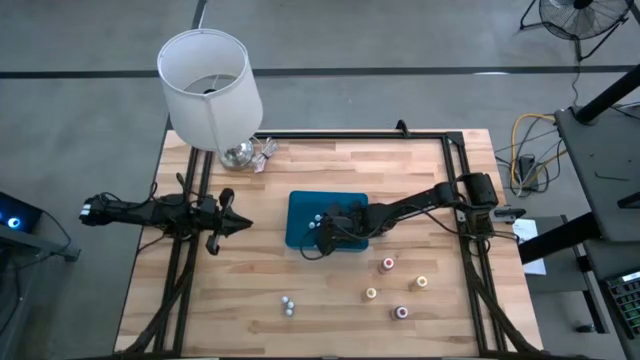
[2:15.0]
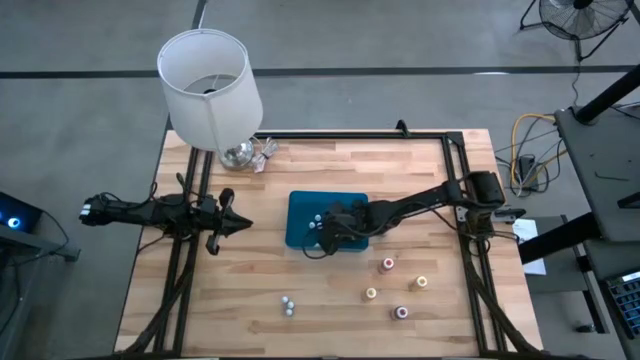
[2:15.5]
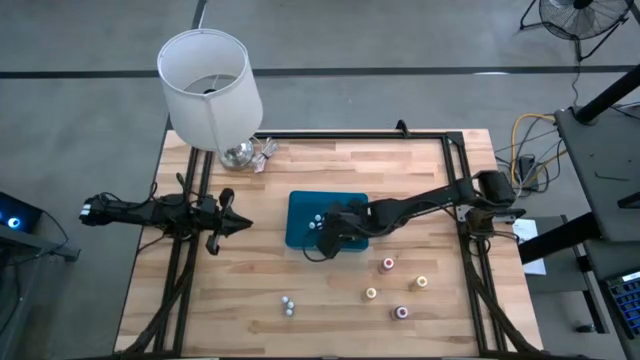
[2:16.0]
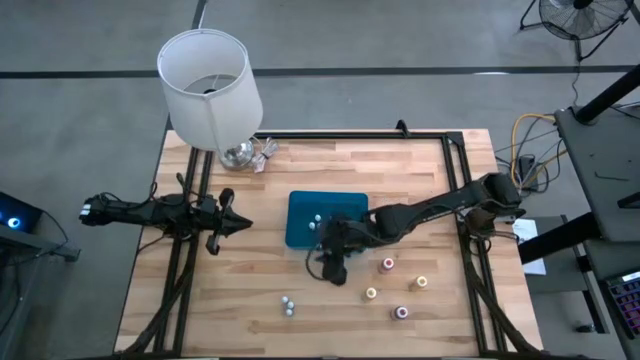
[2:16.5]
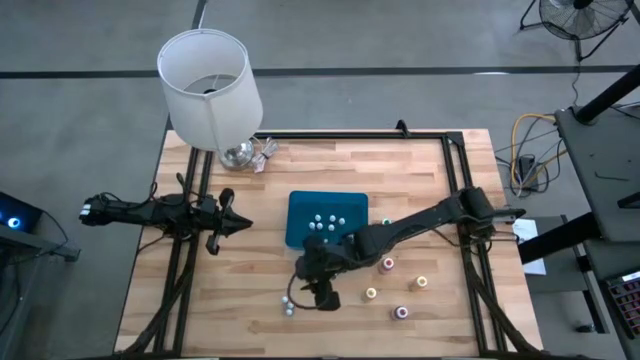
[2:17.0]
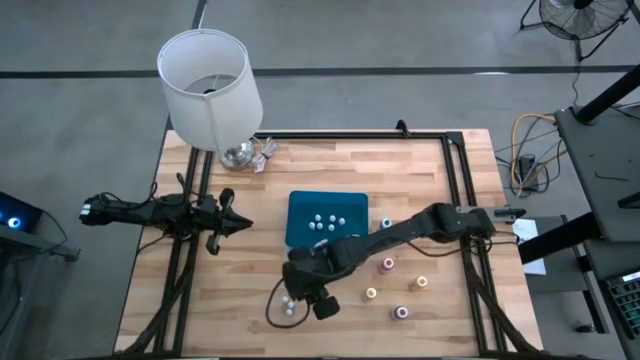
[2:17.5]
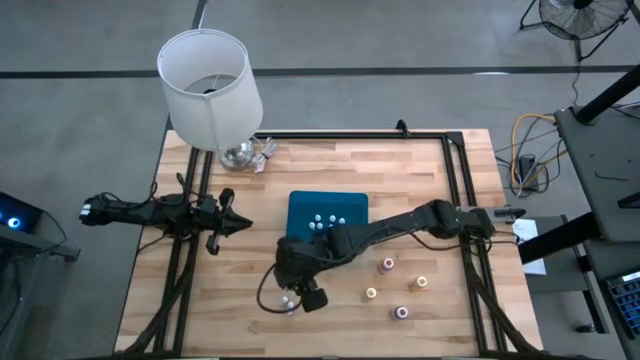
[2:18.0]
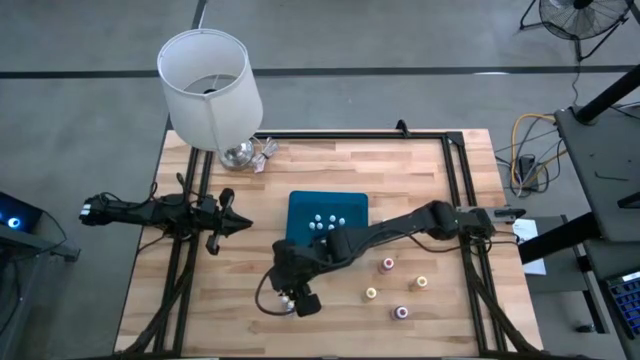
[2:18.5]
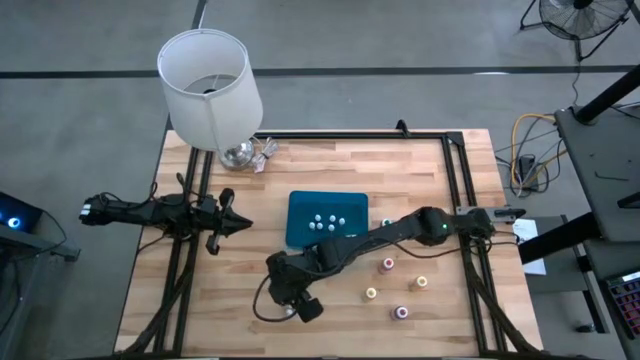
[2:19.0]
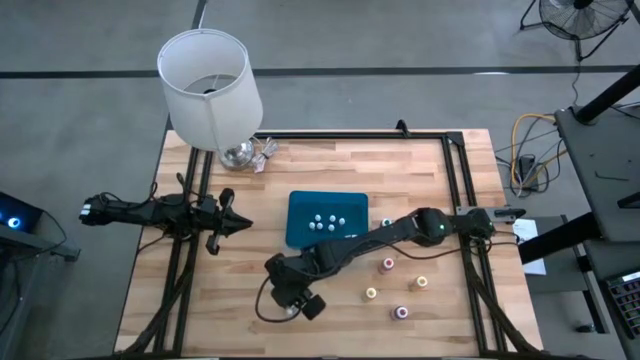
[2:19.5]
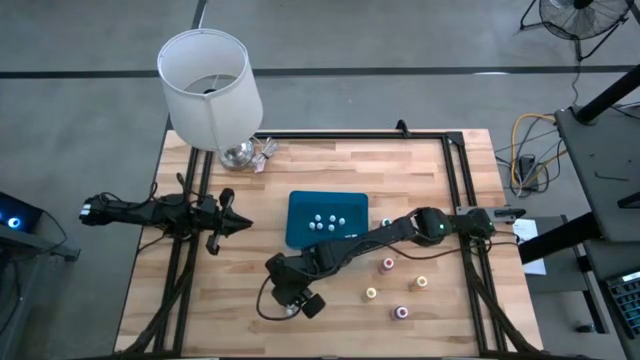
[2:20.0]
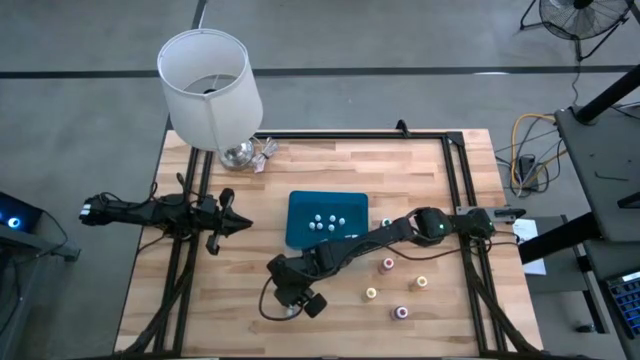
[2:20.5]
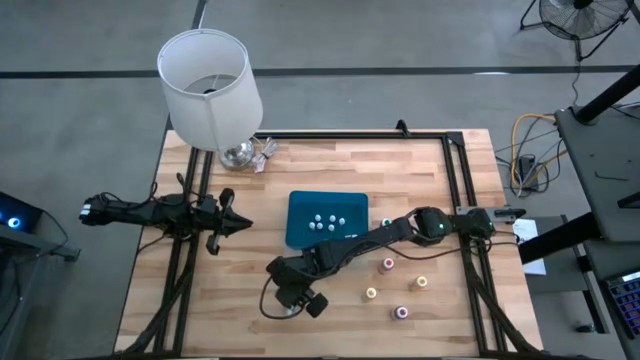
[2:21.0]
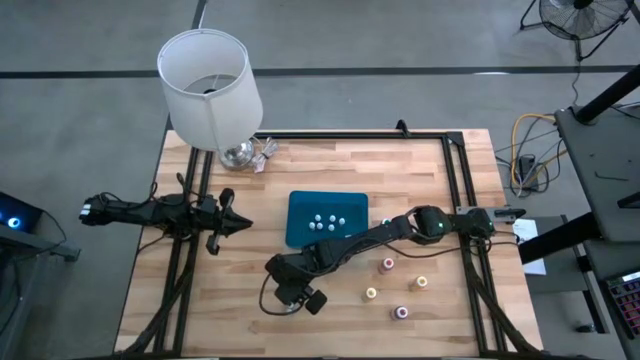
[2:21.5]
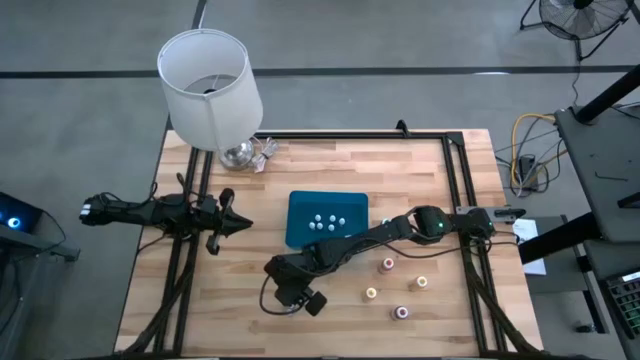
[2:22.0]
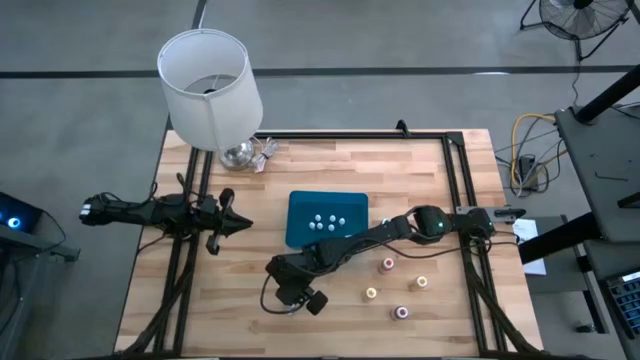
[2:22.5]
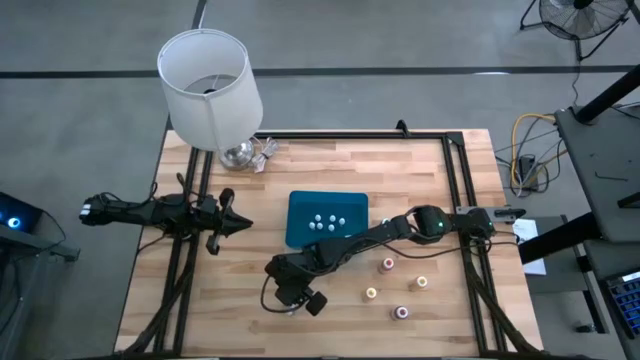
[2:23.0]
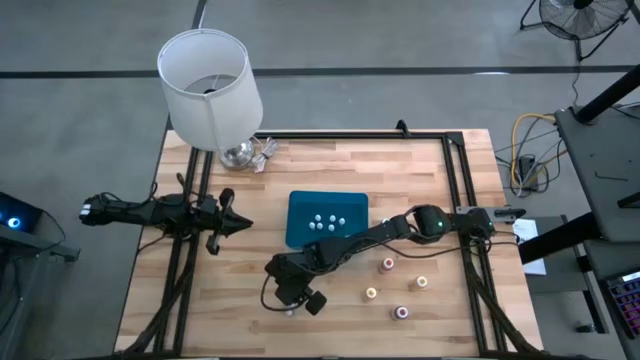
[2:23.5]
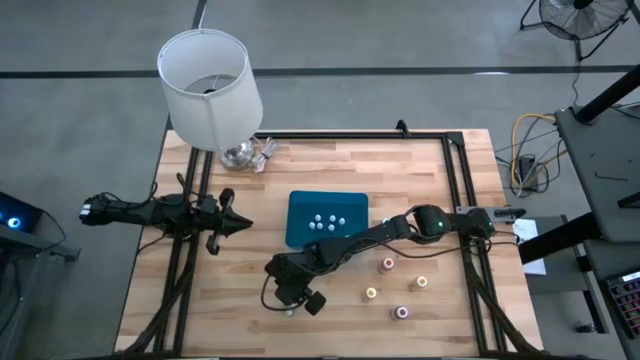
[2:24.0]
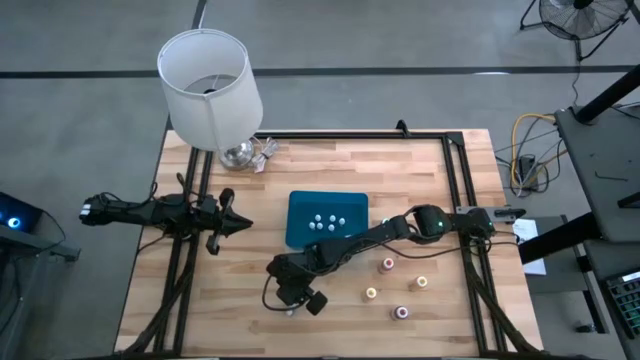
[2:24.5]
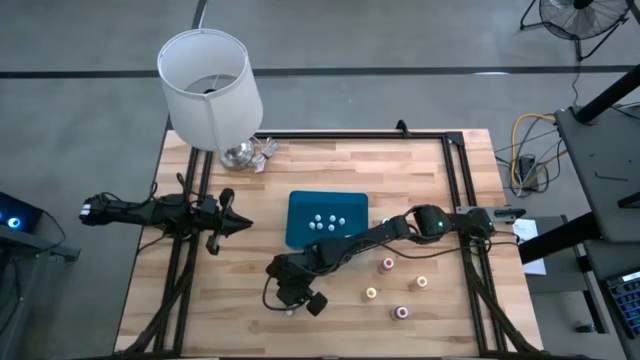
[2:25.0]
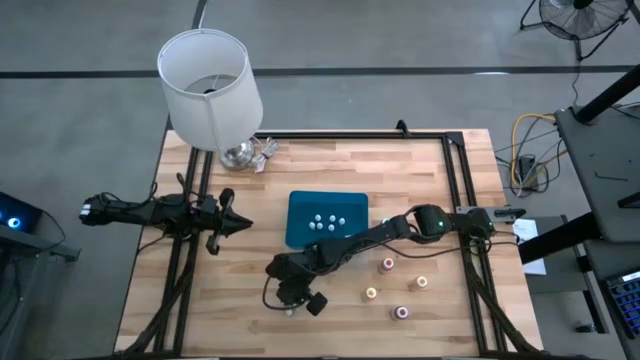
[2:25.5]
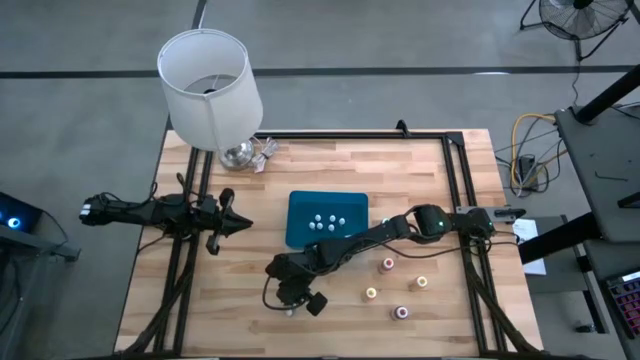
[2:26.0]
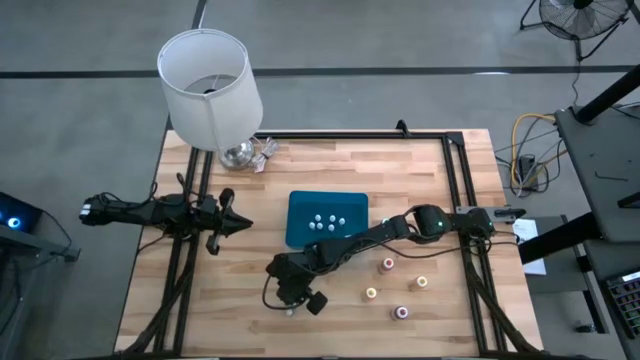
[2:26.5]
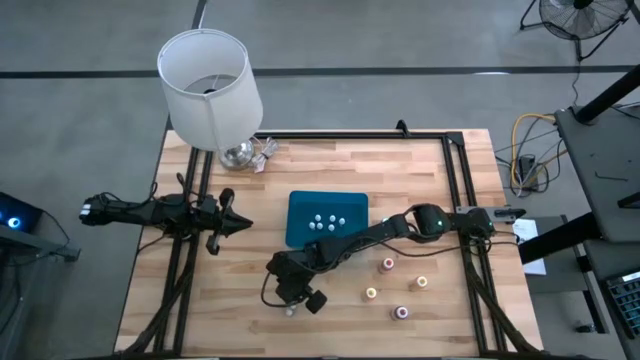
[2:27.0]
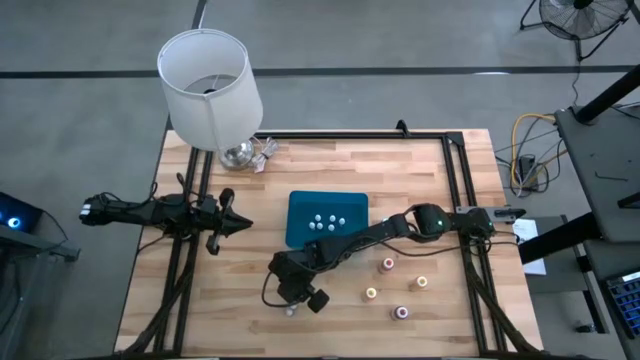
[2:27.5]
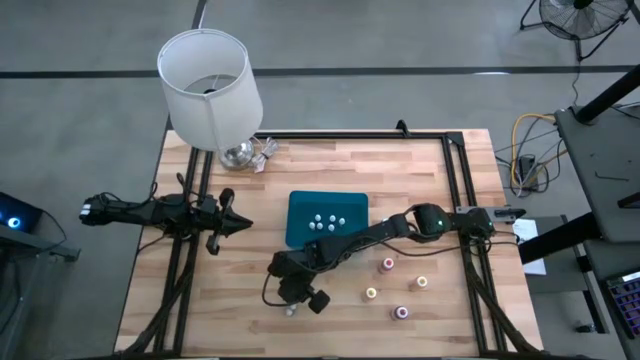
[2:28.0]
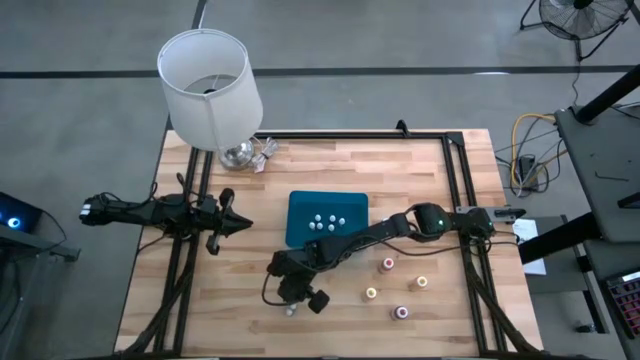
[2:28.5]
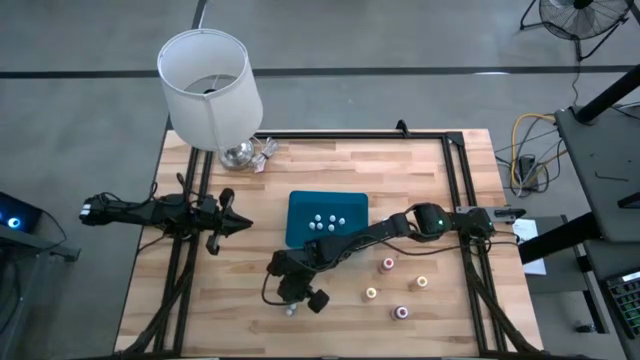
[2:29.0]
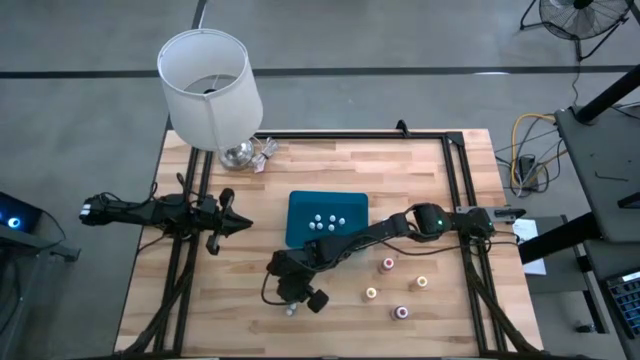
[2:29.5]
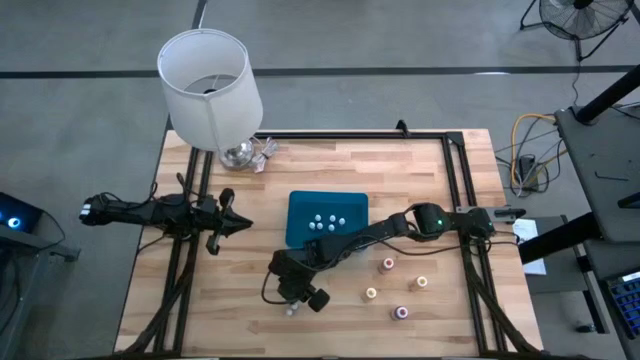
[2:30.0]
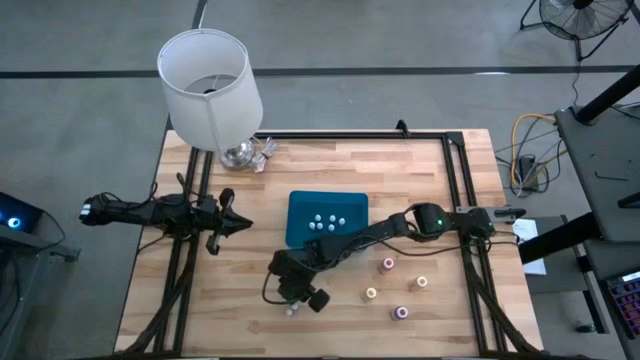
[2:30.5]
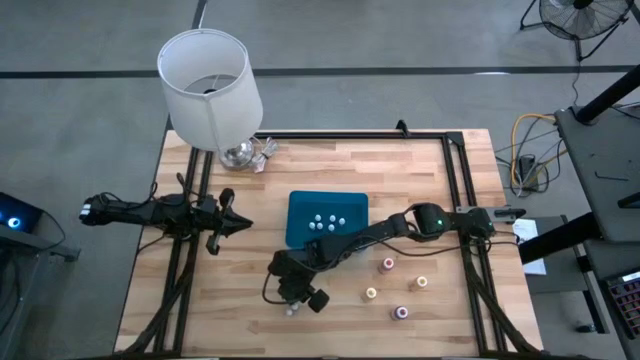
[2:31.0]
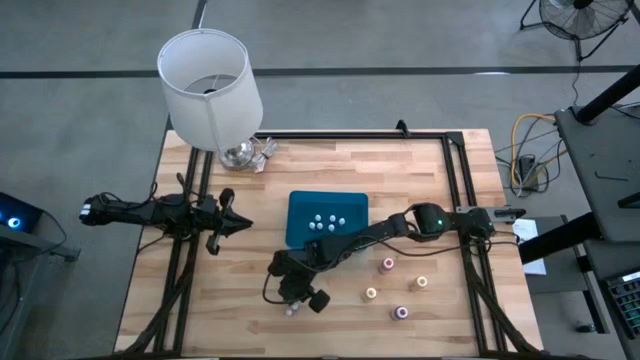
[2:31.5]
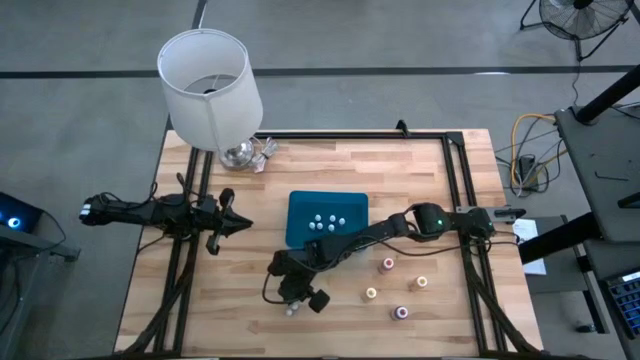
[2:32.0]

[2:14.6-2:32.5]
Task: Pick & Place food coloring
Put the small orange food coloring bottle into the blue bin

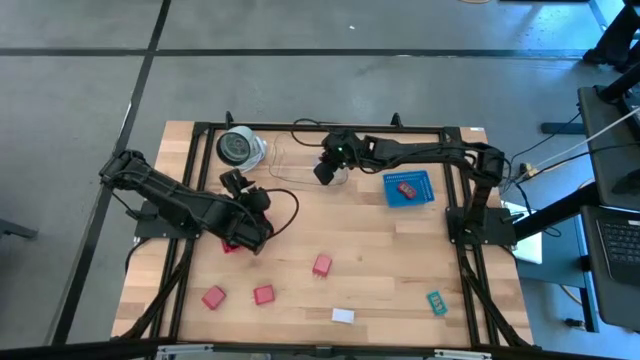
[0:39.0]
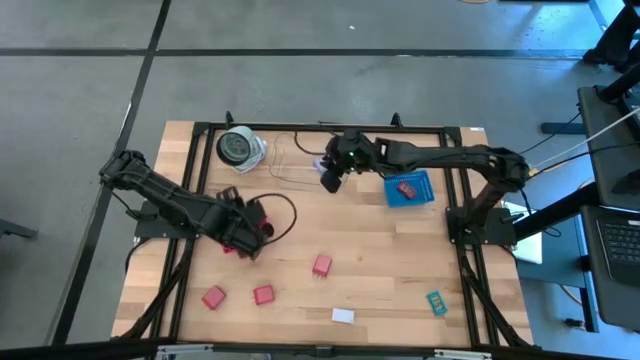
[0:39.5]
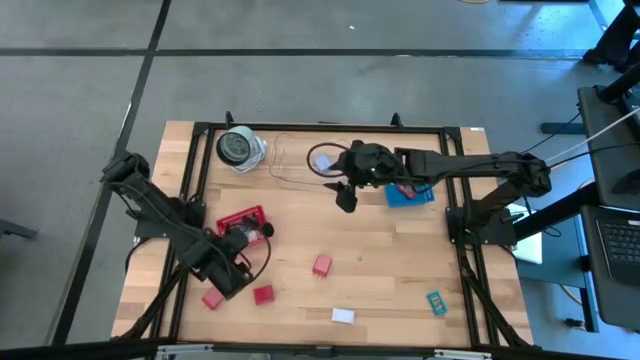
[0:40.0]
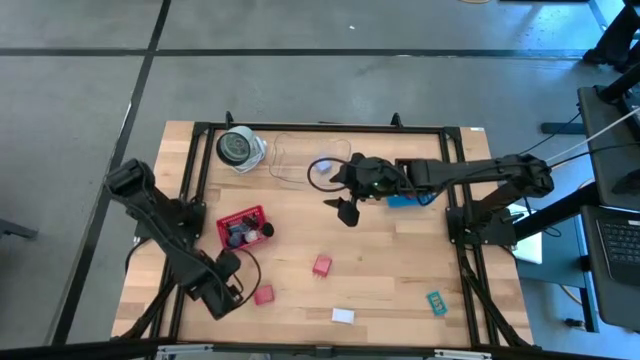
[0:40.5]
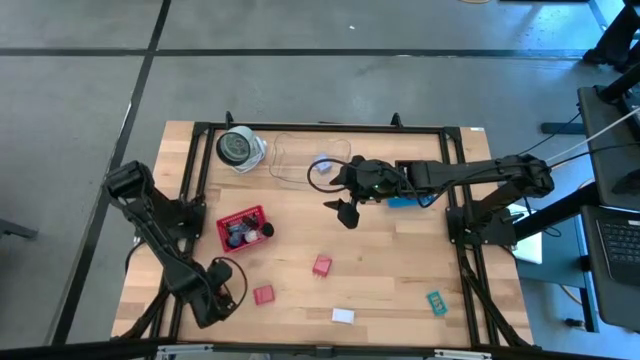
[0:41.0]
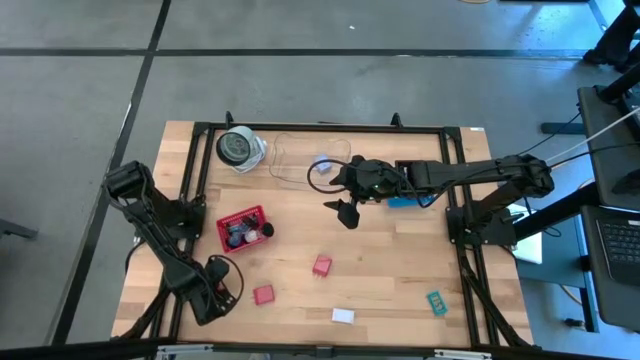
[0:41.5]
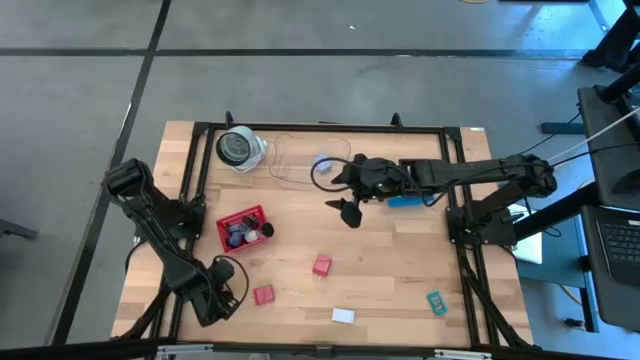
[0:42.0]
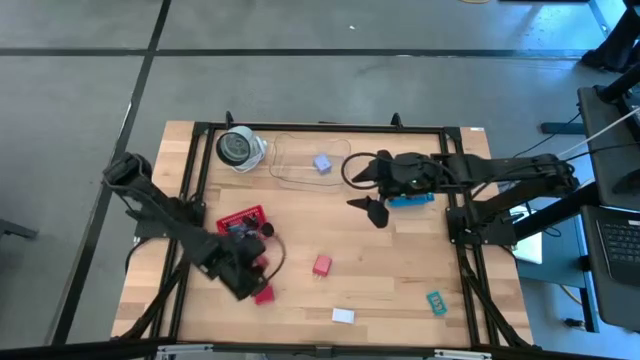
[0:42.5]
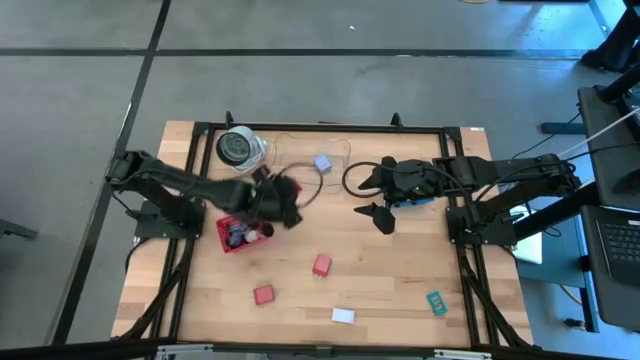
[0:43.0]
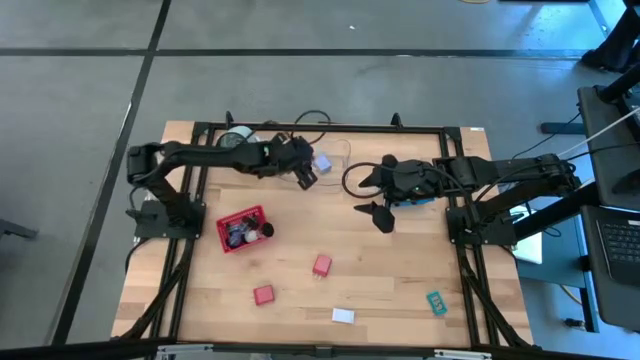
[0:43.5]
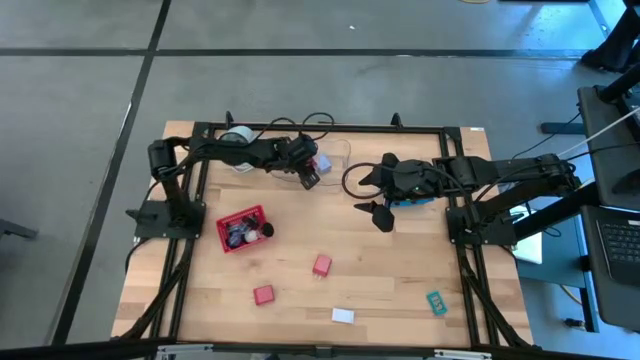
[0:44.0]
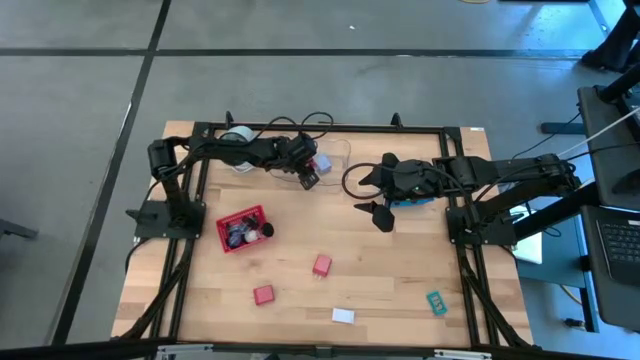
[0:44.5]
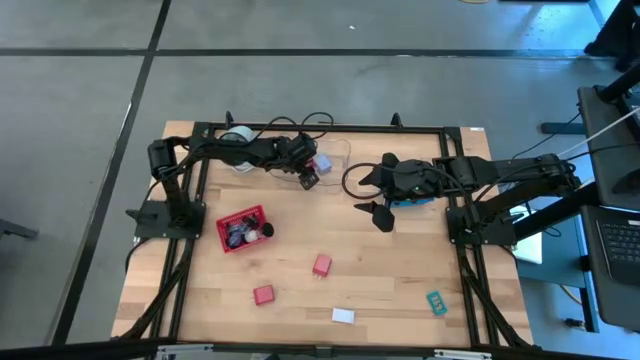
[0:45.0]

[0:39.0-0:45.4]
Task: Pick & Place Office items
Put the left red charger adapter into the transparent bin
